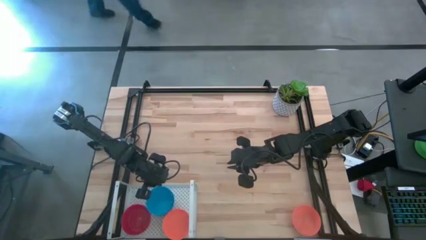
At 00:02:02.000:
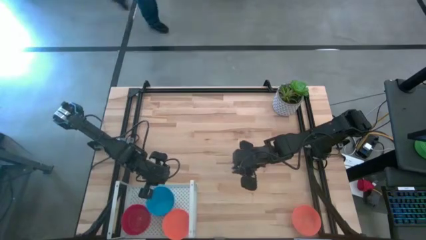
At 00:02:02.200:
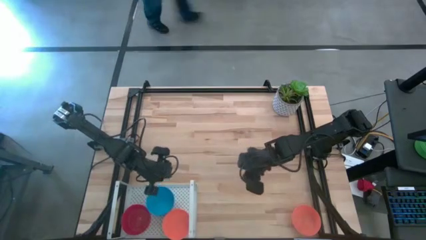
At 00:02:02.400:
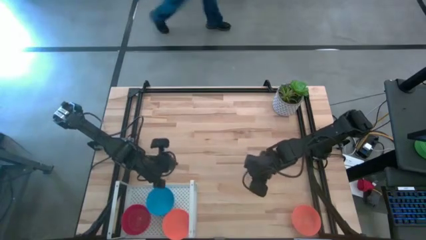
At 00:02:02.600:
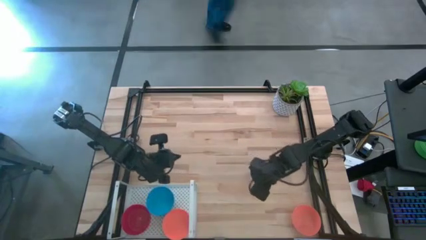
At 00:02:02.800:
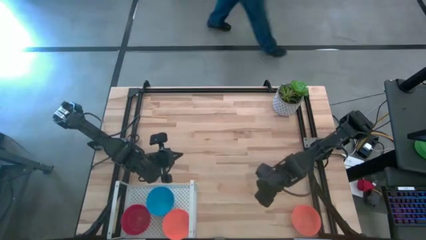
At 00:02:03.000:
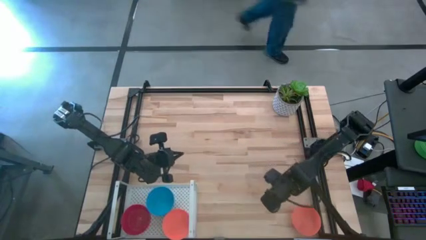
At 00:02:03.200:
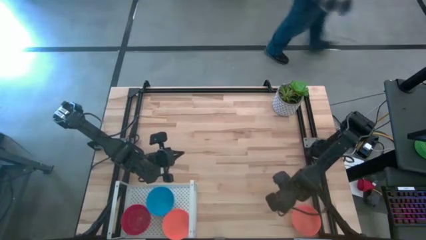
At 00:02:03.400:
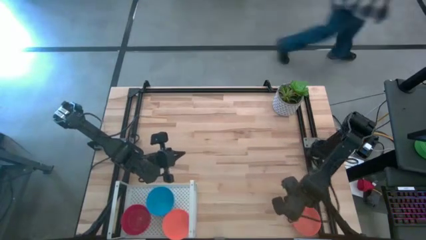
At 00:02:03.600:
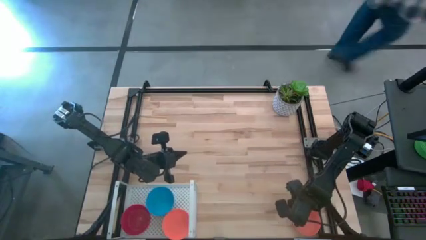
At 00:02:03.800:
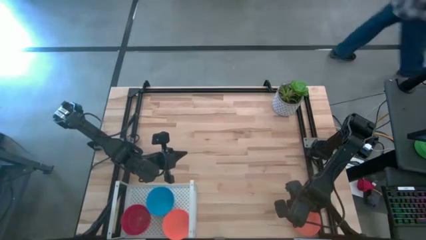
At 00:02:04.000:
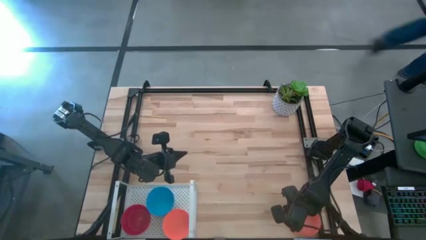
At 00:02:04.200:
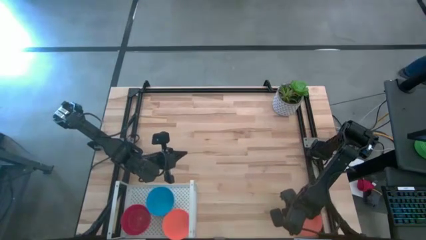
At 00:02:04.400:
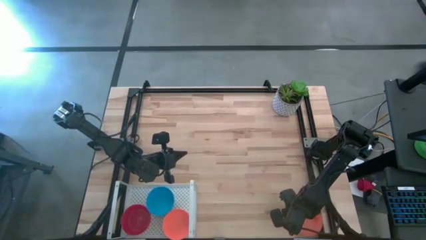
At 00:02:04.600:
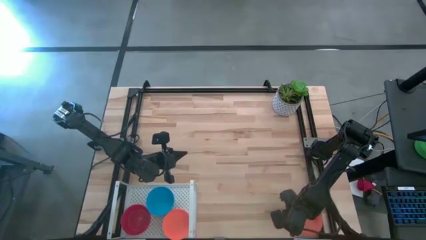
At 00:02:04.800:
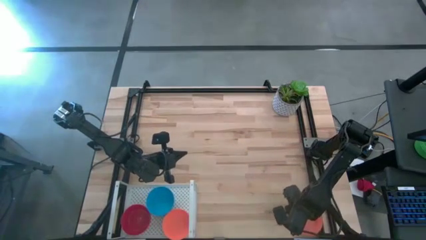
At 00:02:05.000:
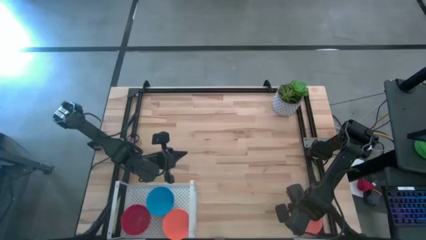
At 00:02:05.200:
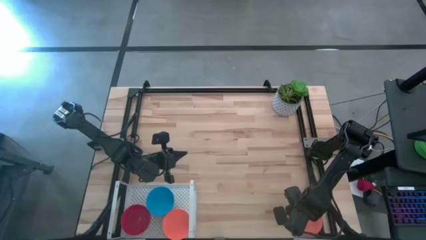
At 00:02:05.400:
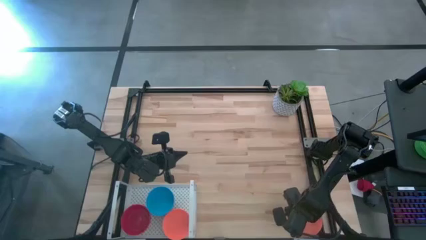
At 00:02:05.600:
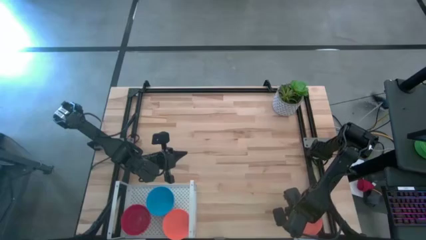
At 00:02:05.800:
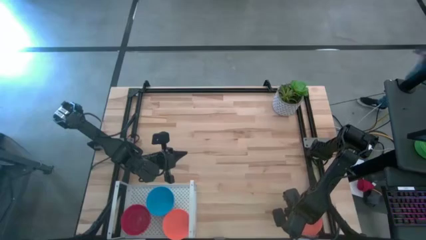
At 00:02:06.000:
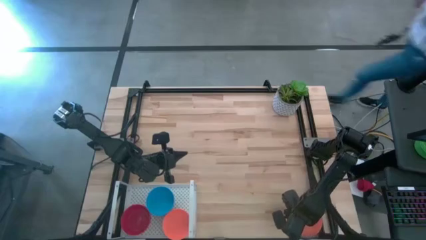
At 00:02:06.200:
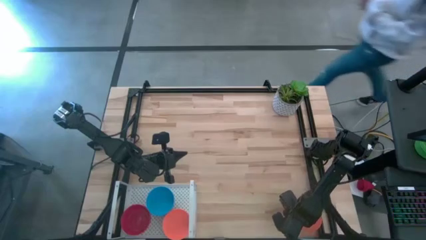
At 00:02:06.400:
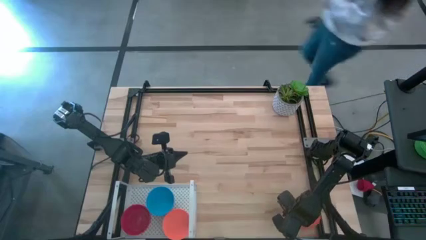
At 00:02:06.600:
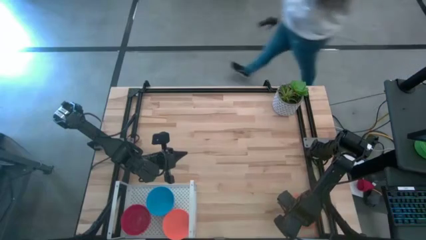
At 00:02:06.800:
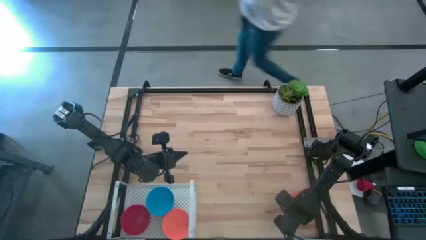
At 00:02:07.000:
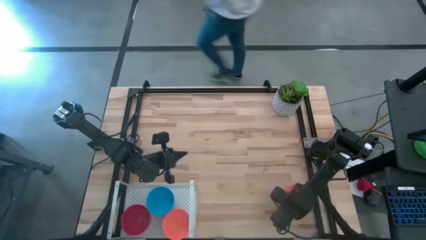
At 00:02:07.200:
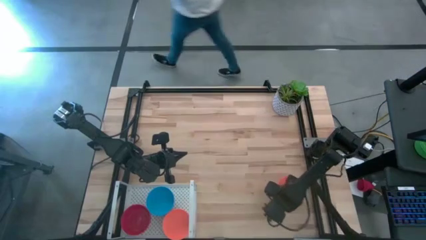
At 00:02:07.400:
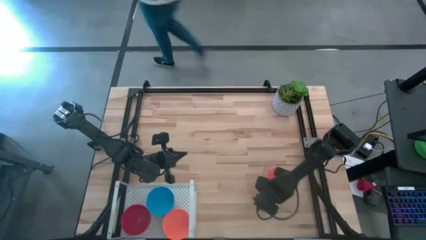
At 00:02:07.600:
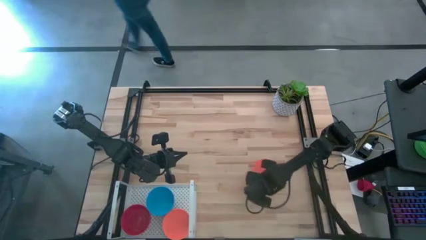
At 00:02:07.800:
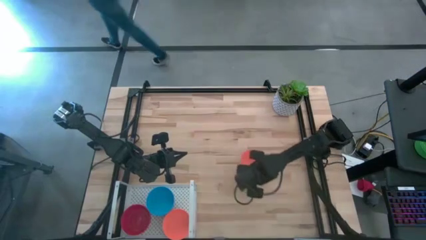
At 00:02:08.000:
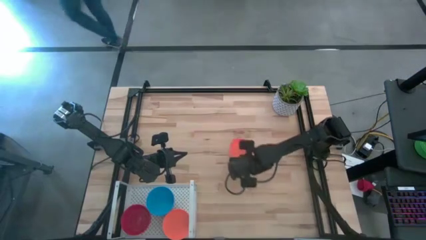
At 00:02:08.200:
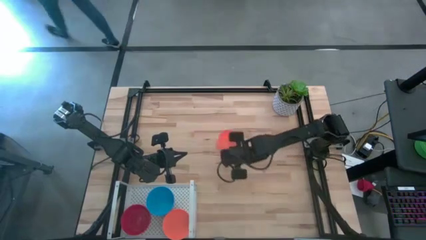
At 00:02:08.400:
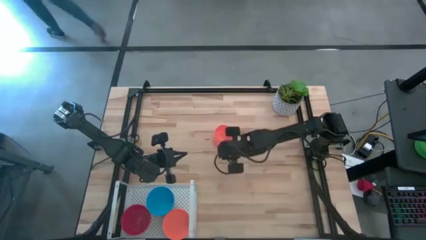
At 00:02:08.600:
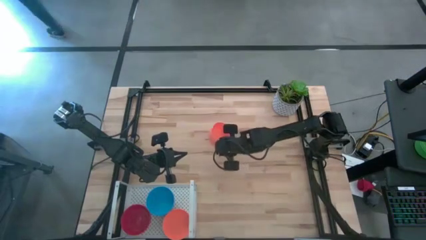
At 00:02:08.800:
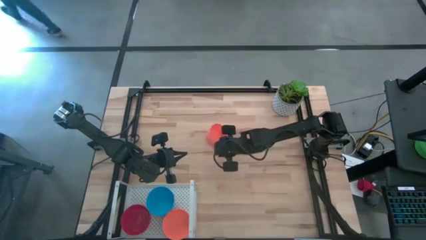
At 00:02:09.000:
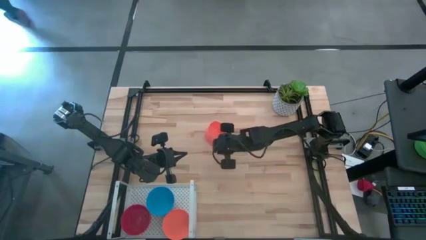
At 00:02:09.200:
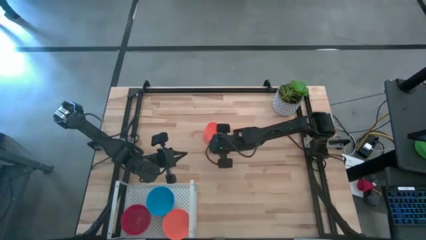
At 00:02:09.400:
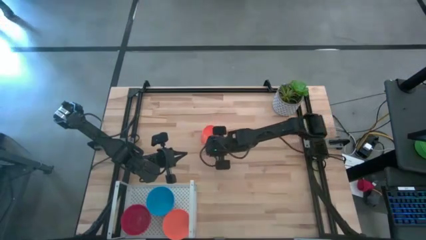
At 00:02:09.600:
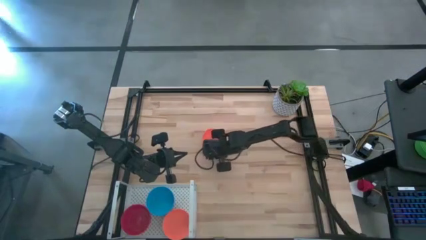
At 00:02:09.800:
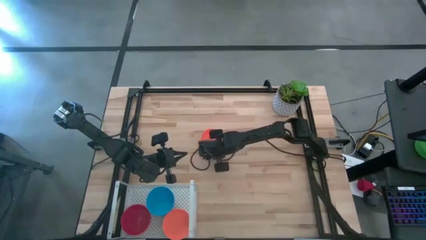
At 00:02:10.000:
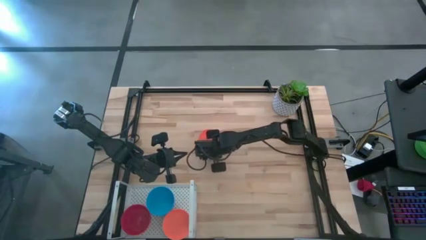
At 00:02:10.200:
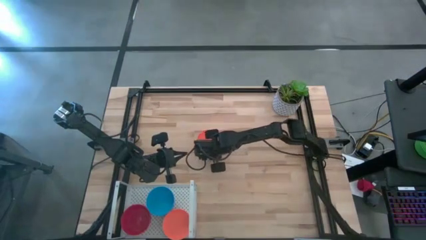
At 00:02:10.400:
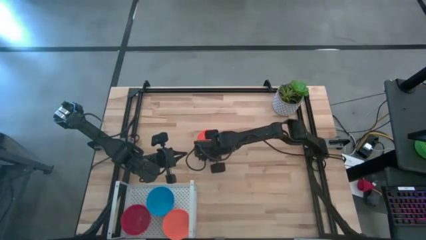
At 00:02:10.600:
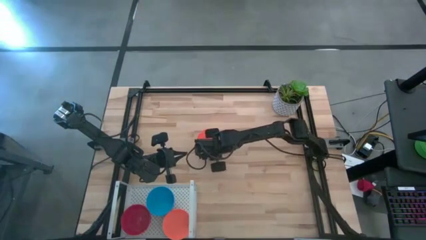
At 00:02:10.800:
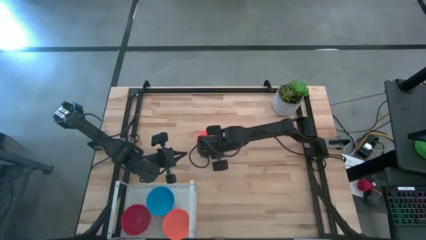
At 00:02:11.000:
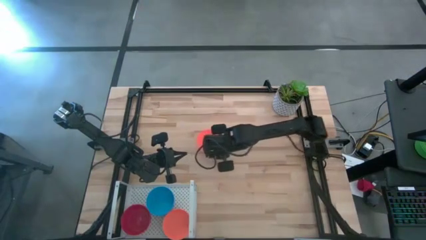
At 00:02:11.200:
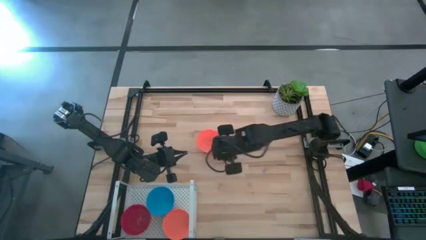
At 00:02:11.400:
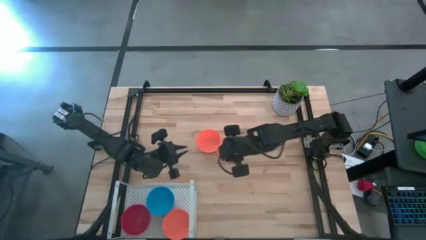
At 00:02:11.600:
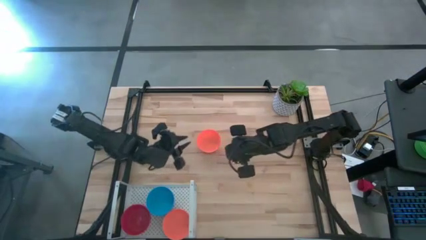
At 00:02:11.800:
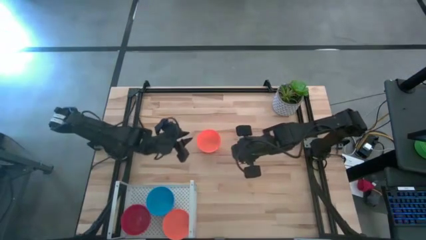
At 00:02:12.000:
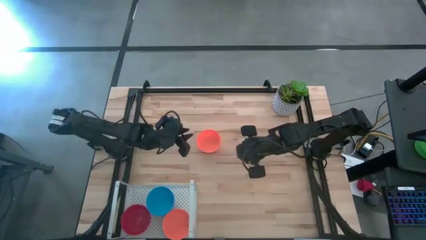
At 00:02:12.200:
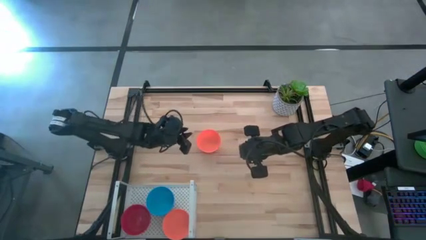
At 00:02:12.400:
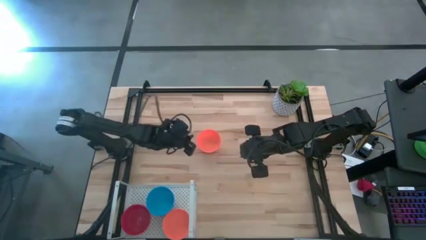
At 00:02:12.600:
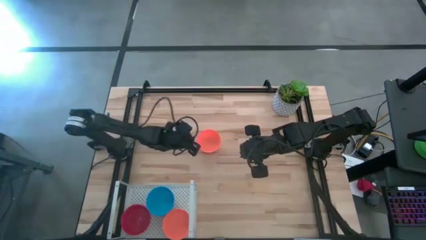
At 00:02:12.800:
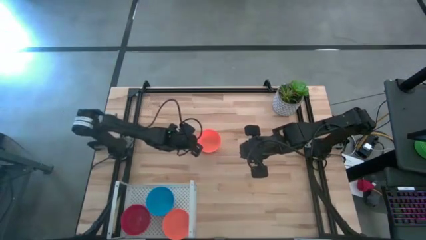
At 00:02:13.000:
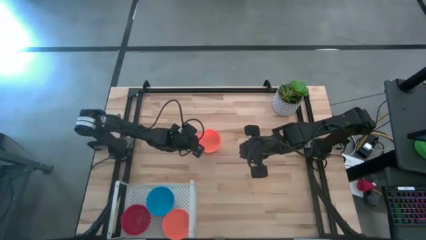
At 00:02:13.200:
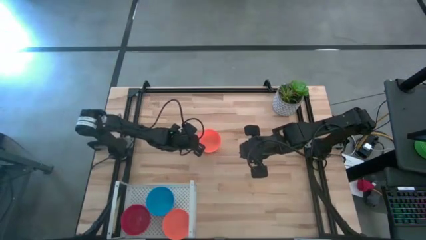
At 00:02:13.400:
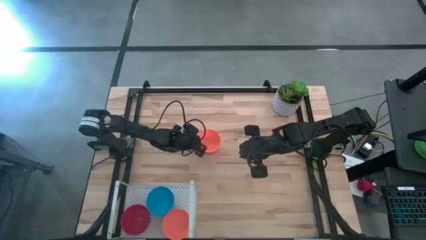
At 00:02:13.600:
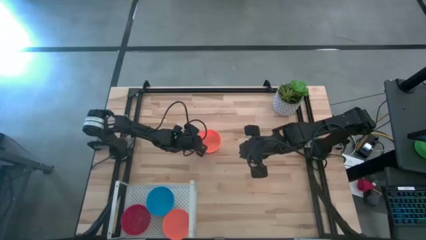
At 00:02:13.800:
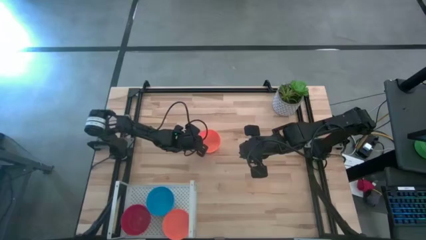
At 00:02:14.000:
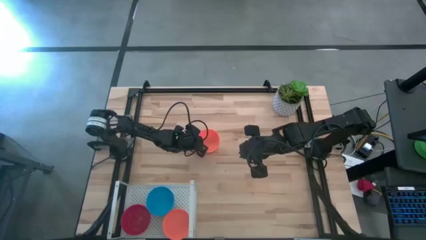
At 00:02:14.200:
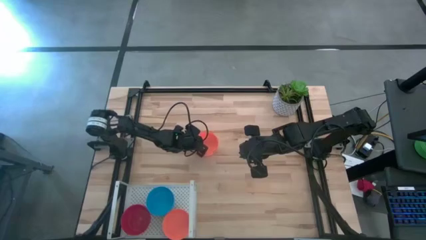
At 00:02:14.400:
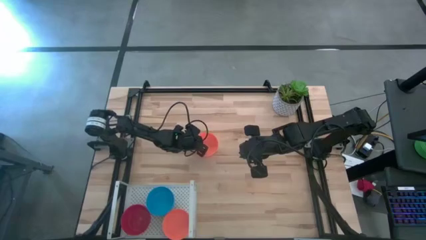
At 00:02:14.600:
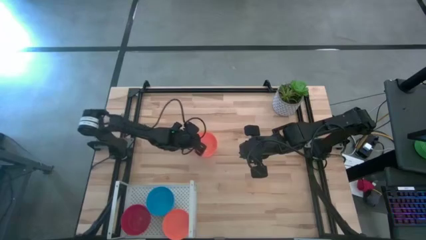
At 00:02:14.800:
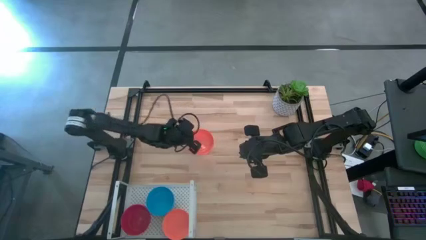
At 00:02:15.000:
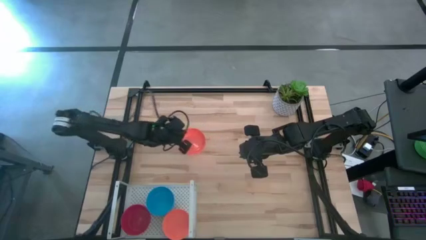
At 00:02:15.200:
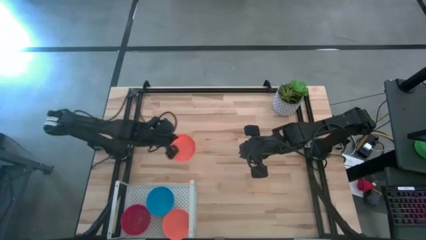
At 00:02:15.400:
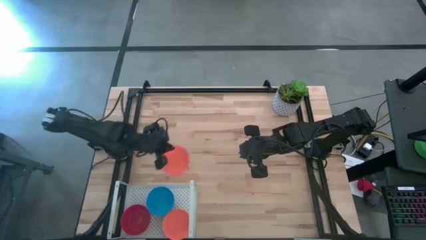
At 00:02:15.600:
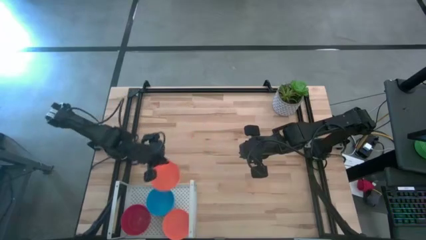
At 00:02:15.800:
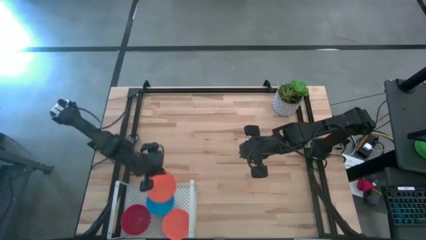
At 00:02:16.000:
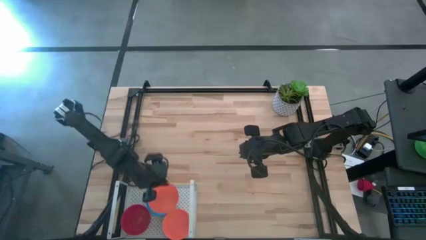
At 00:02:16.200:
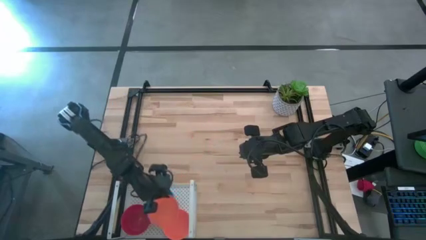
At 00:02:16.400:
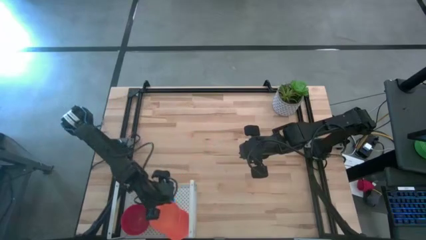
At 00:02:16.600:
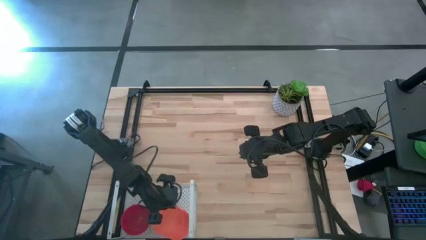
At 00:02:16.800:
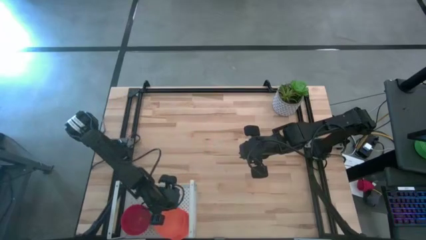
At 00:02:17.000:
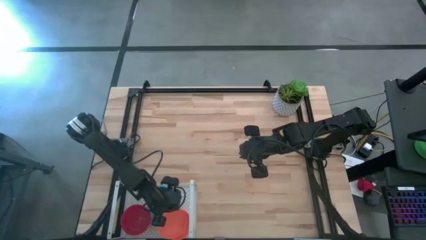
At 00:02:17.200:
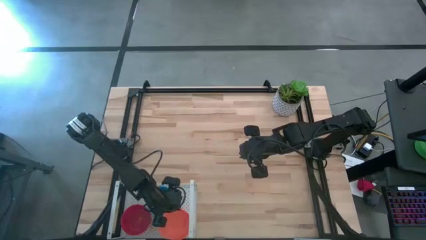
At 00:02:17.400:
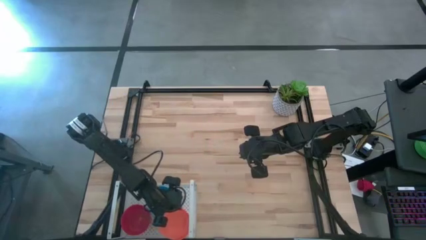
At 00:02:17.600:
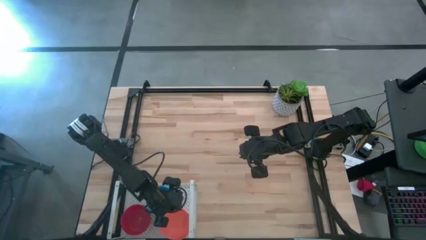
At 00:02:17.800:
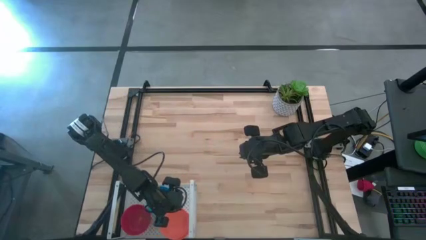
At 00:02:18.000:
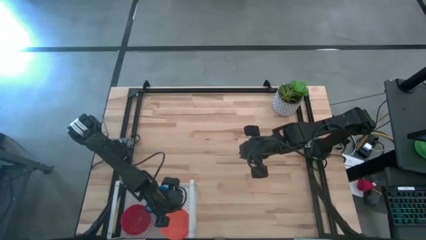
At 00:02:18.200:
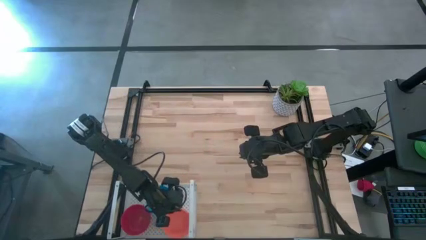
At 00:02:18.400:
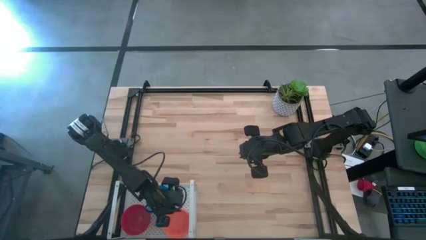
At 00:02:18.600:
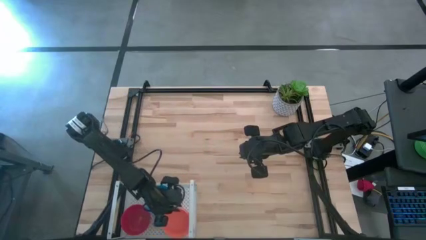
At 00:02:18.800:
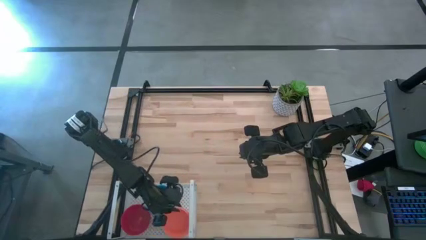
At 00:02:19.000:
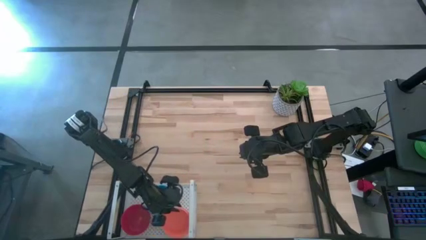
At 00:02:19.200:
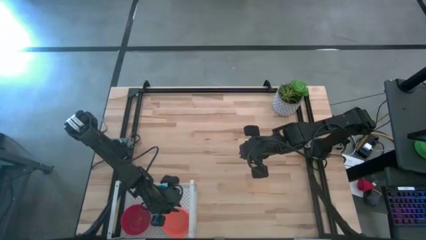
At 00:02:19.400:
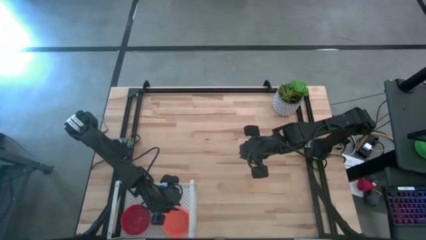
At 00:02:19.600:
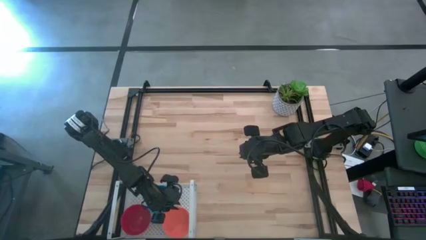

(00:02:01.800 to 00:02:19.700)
Task: Pick & Place Mini bowls
Stack the orange bowl on top of the orange bowl on the shelf
